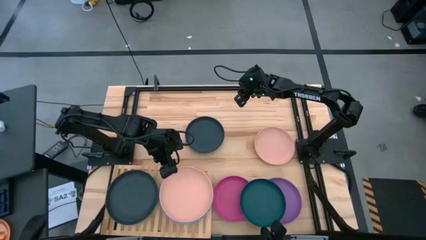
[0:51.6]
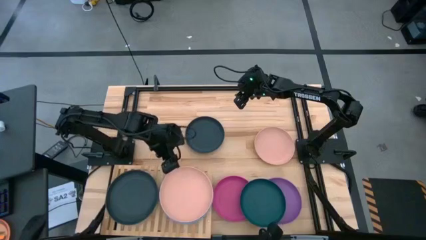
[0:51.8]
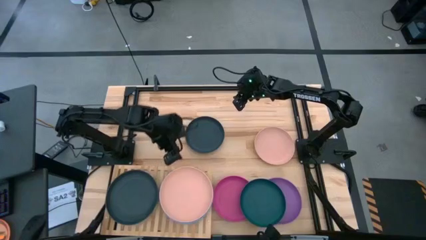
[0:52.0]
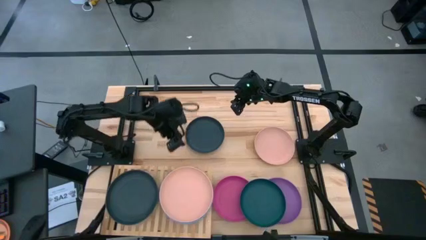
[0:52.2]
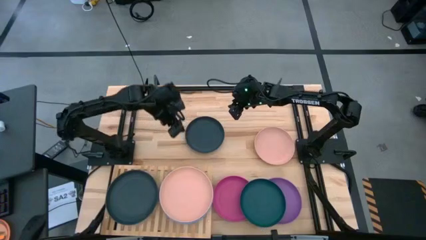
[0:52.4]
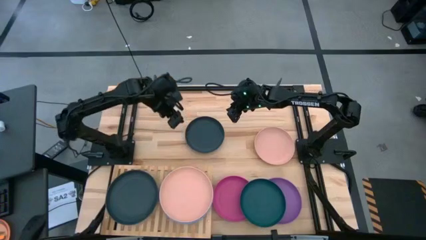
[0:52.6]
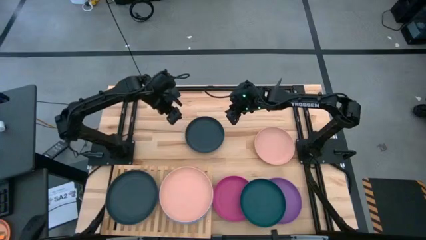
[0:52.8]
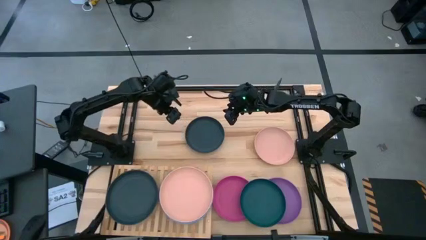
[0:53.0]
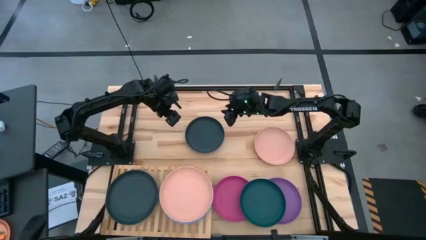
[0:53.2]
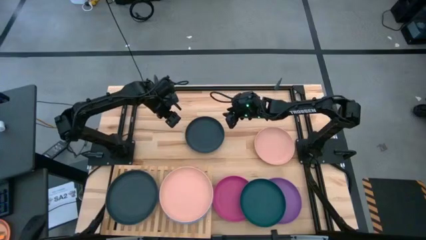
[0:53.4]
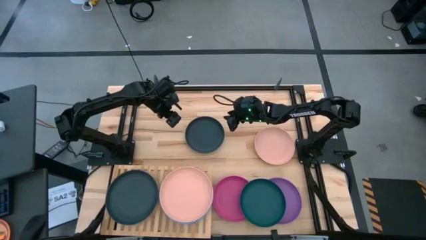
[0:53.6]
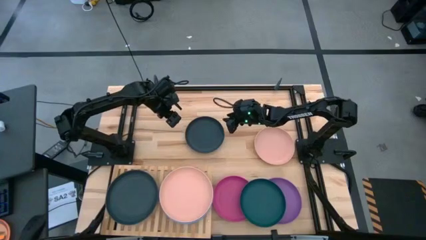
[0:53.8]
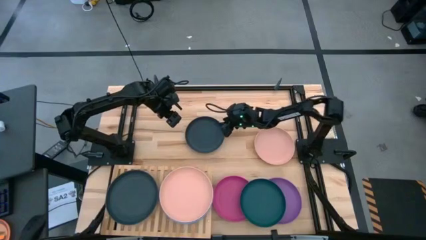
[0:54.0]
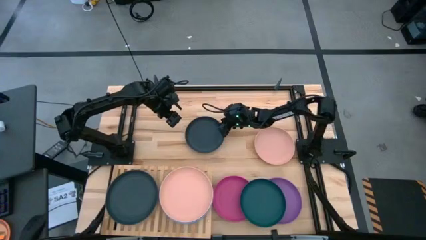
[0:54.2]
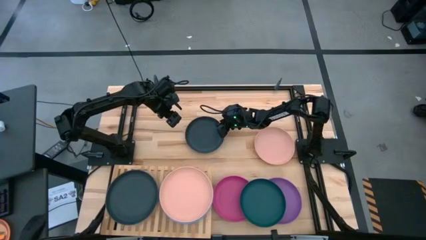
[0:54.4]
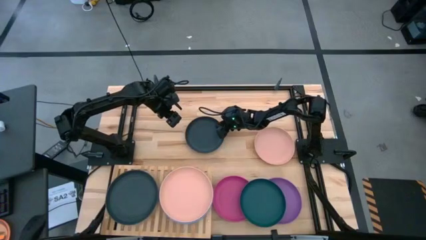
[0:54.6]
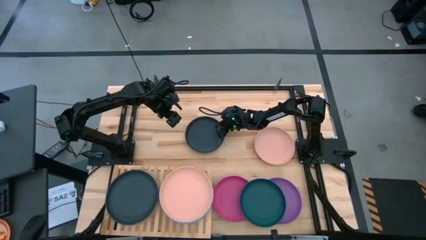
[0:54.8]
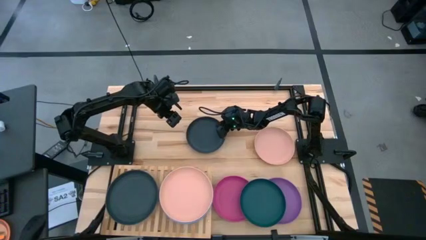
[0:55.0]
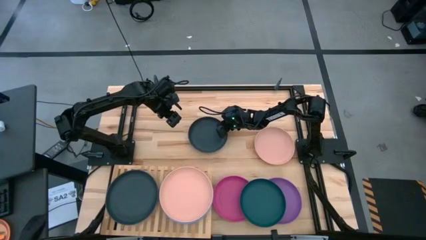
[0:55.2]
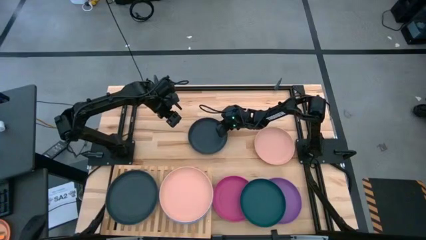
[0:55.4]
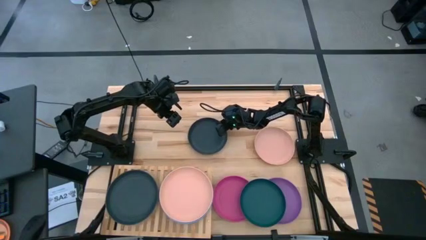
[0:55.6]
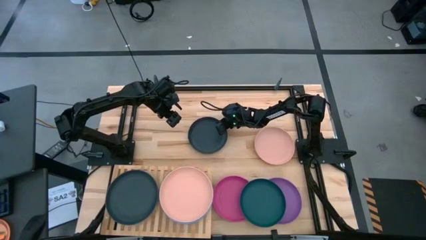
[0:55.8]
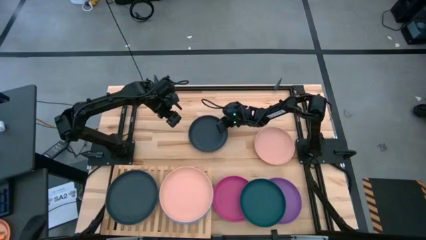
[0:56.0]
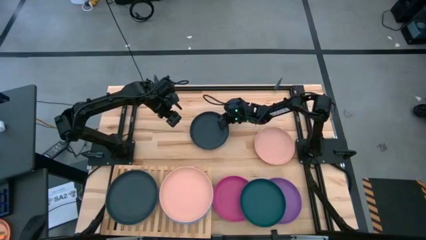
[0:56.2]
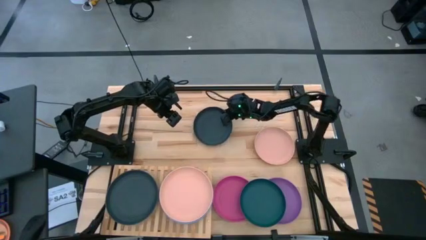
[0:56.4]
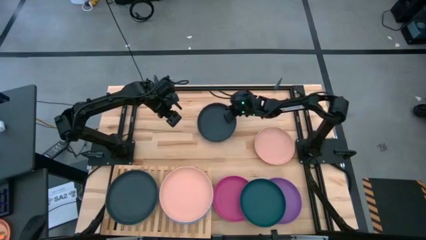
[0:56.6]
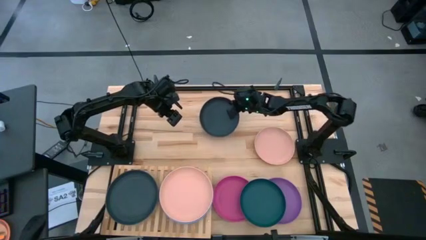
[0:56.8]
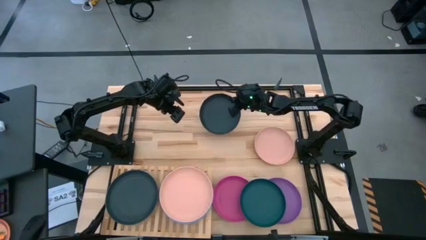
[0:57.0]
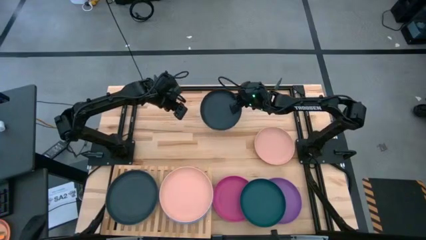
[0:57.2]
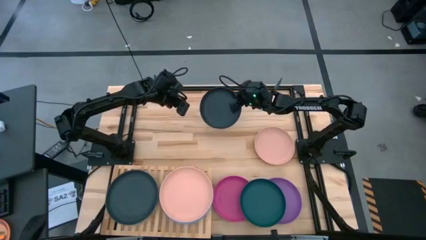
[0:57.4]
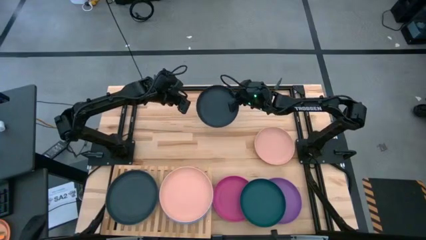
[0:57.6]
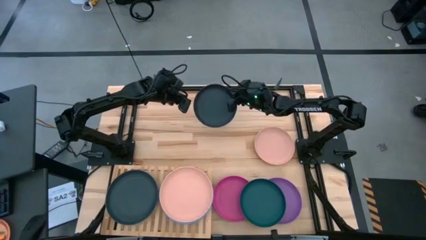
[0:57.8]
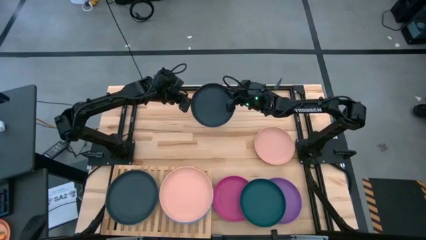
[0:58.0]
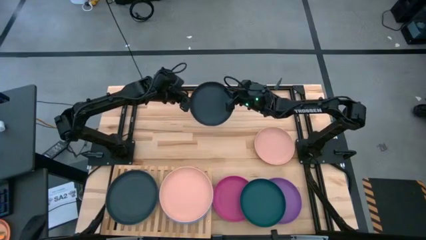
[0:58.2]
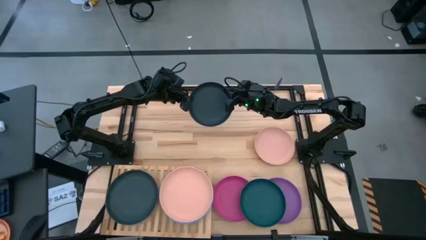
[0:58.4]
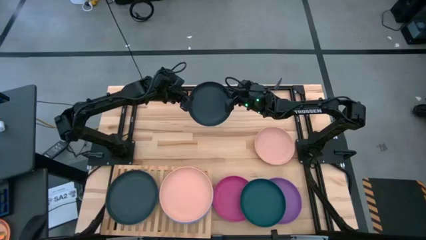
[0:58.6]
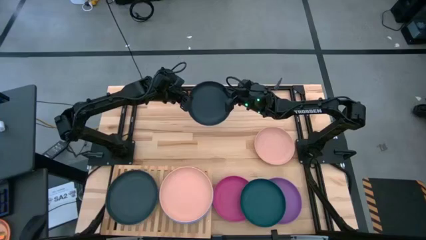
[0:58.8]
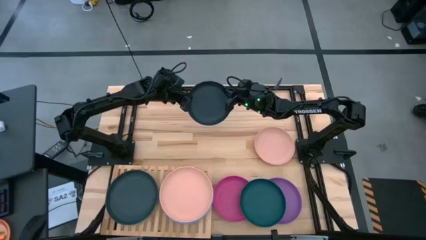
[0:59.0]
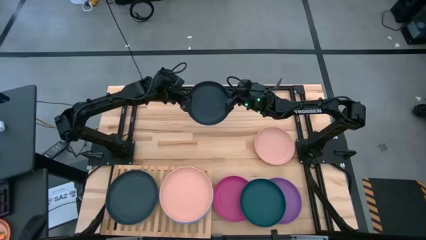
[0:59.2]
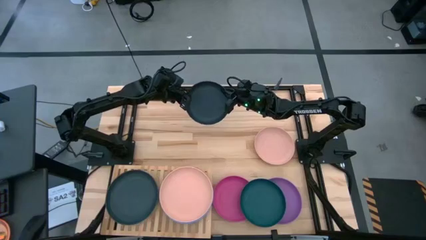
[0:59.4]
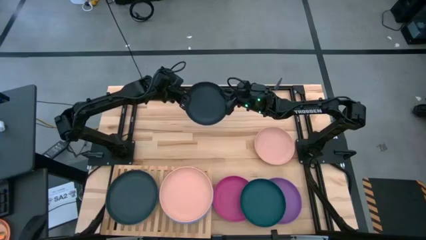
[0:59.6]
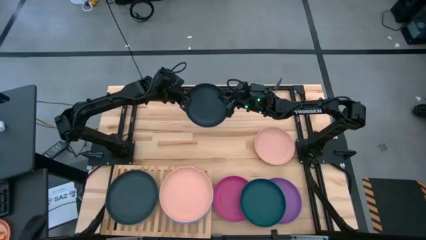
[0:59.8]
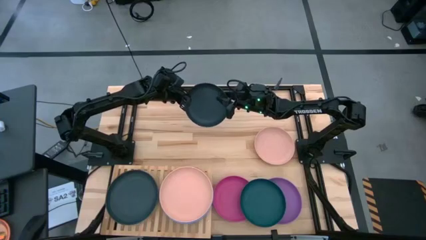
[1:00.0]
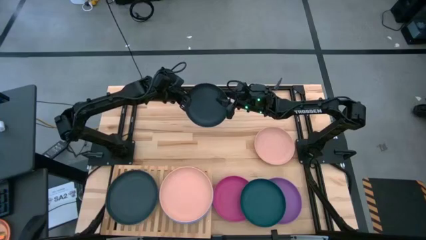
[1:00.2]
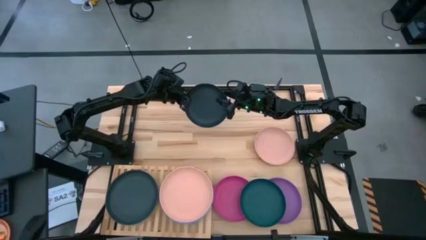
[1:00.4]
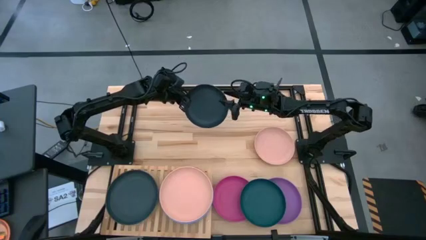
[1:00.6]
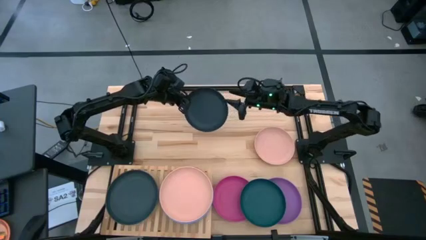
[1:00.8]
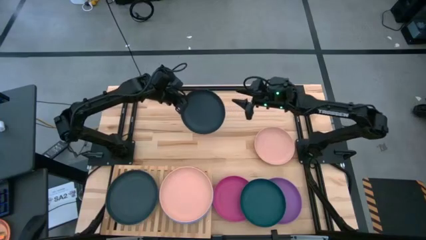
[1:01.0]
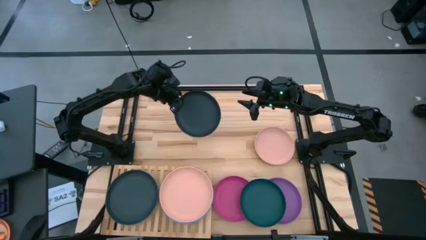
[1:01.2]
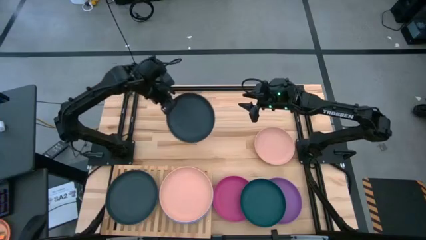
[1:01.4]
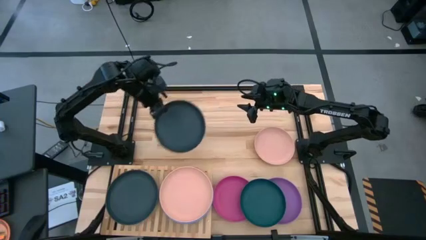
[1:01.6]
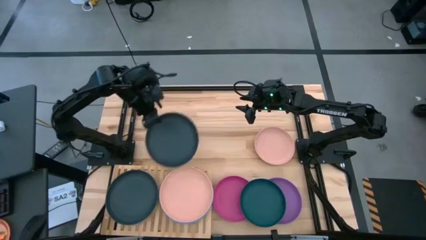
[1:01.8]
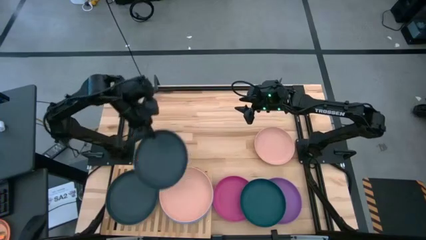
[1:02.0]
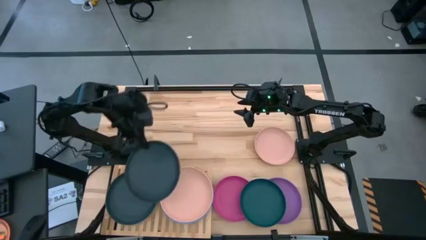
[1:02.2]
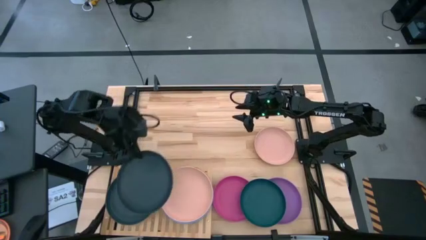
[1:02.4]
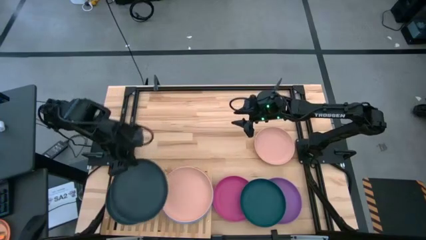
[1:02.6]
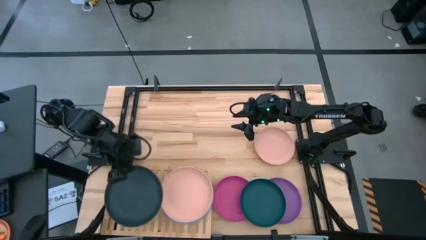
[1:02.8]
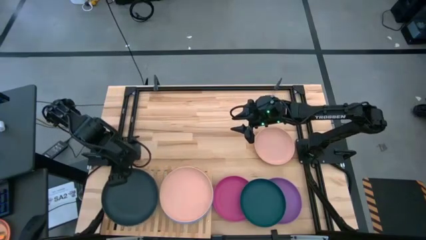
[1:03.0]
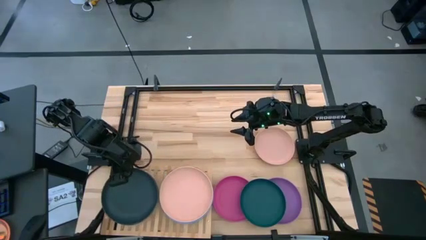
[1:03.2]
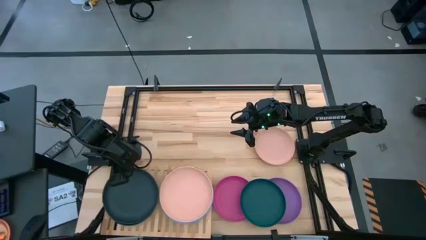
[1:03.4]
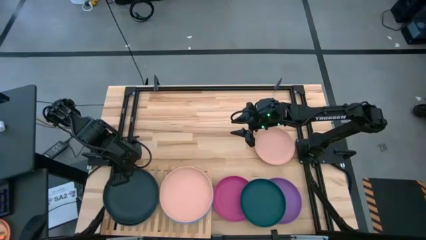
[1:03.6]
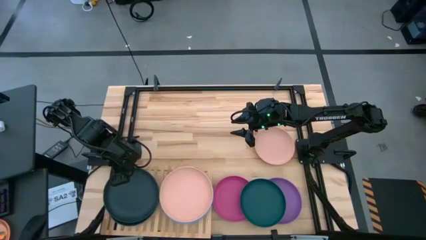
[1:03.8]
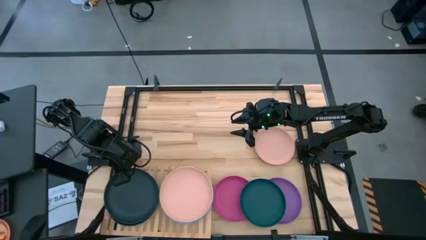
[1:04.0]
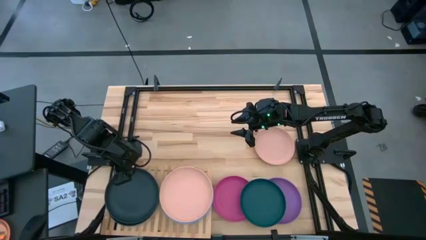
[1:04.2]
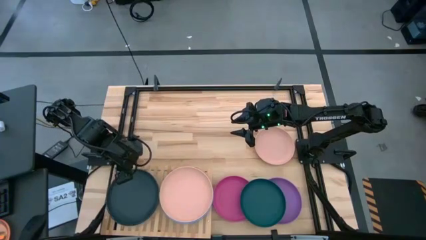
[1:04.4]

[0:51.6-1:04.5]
Task: Place and stack plates onto a shelf
Stack the top dark green plate on top of the dark green plate on the shelf
